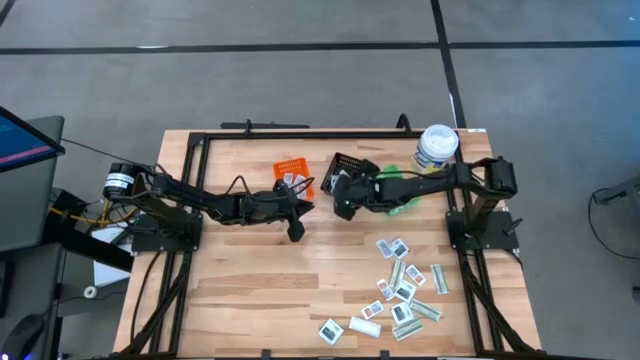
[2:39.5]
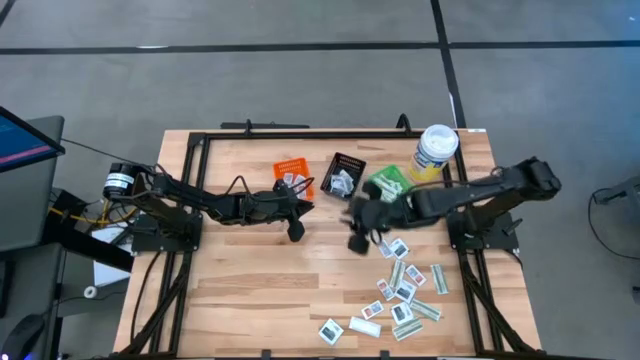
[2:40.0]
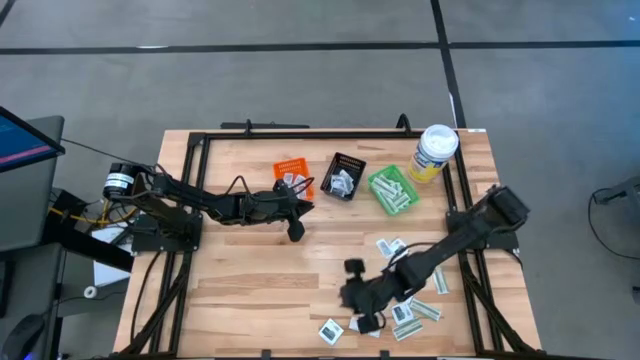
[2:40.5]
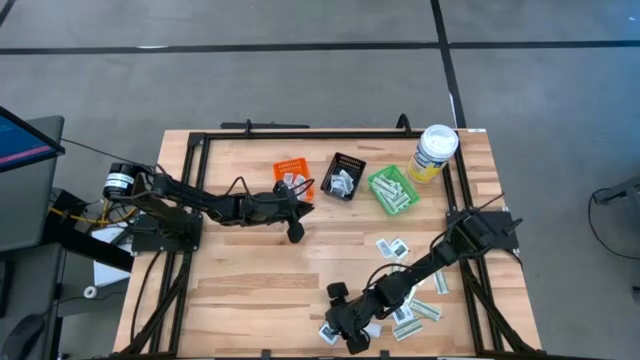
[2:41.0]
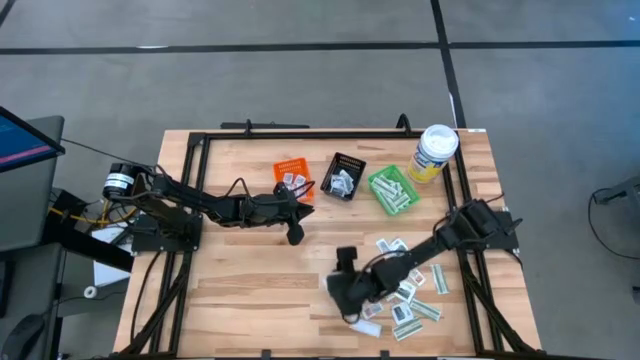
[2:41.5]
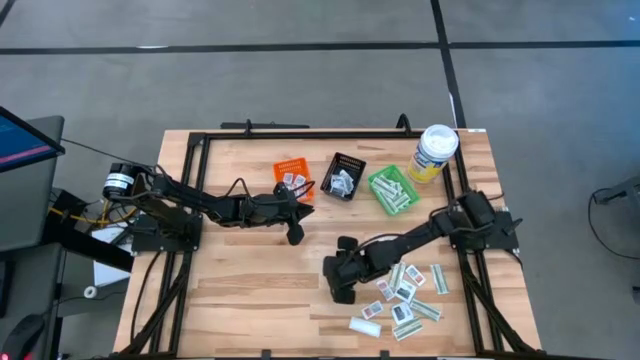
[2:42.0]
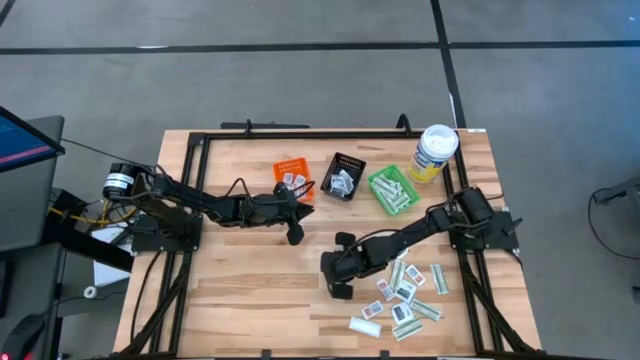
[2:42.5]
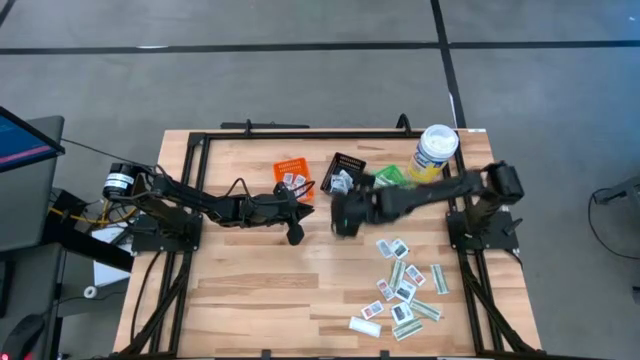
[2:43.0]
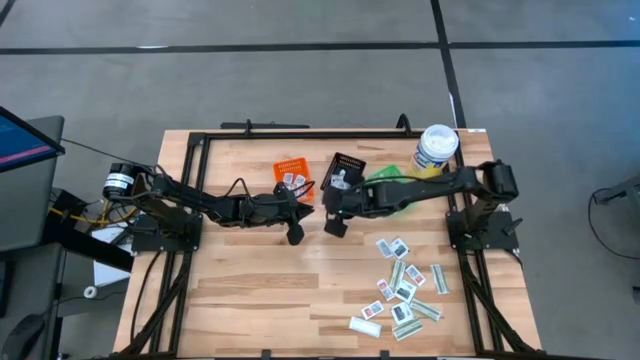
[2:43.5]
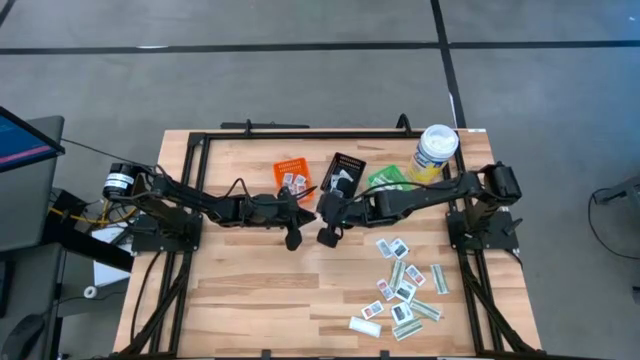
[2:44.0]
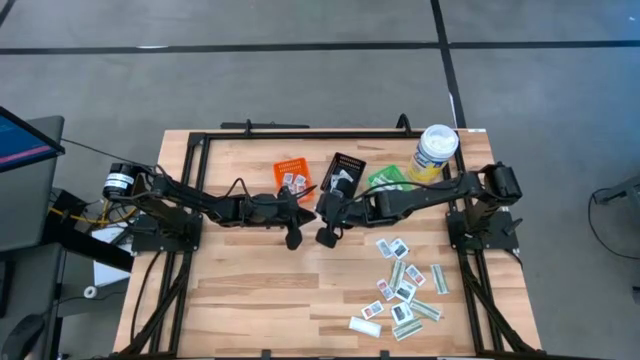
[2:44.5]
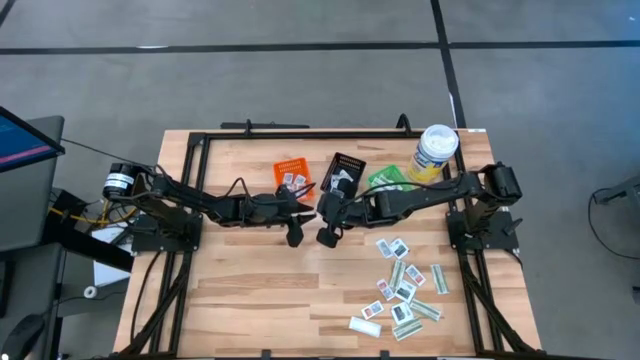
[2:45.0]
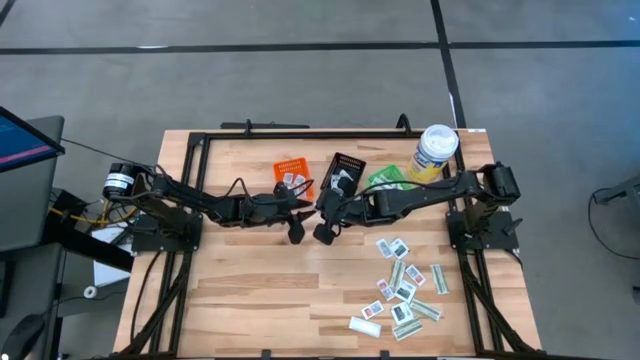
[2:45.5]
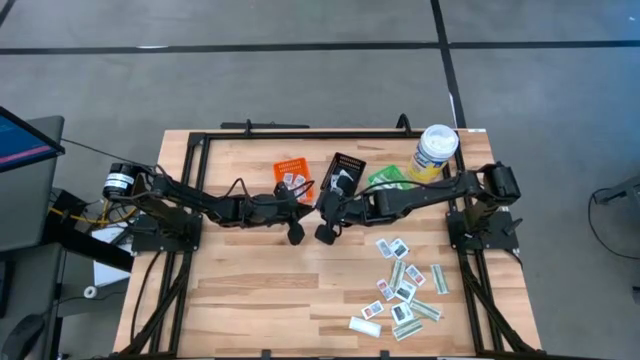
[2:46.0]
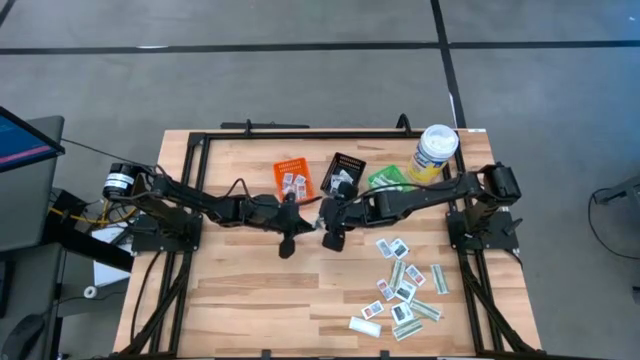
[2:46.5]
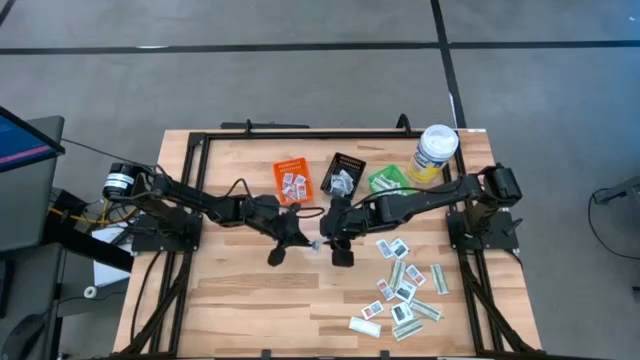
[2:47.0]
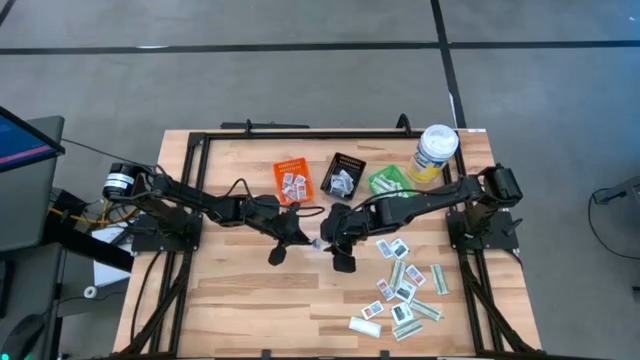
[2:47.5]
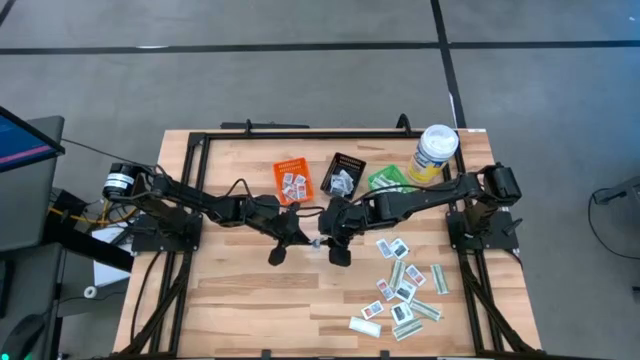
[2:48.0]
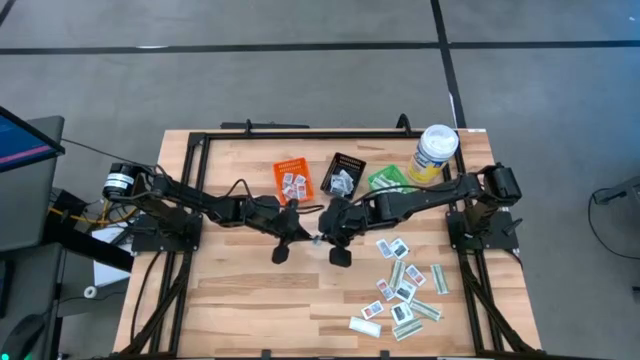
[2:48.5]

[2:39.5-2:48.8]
Task: Pick & Place First Aid Supplies
Put the black towelette pack into the black basket

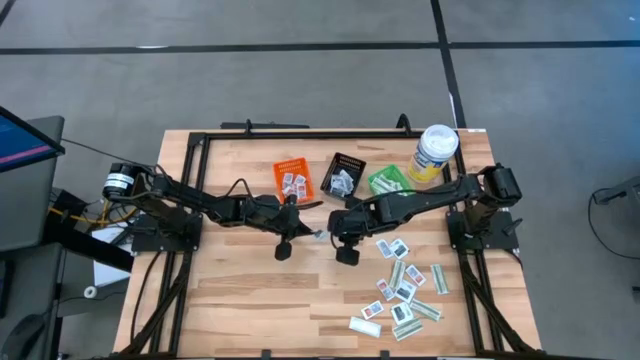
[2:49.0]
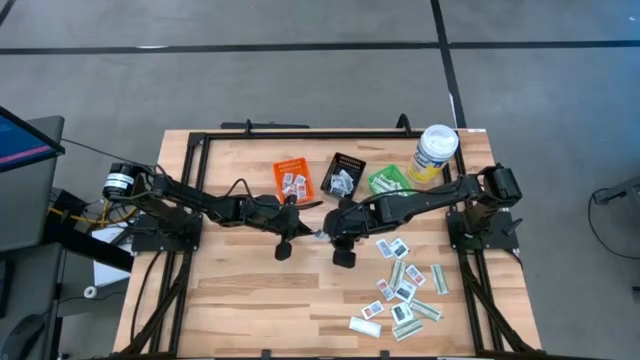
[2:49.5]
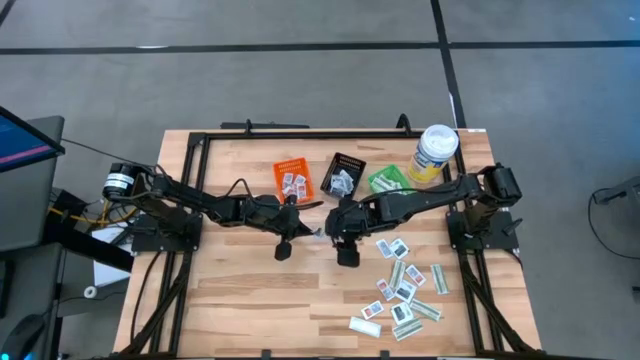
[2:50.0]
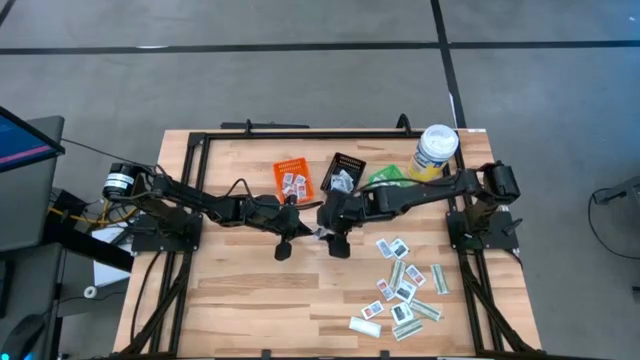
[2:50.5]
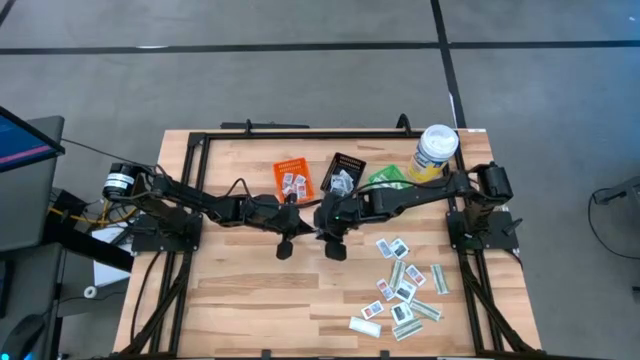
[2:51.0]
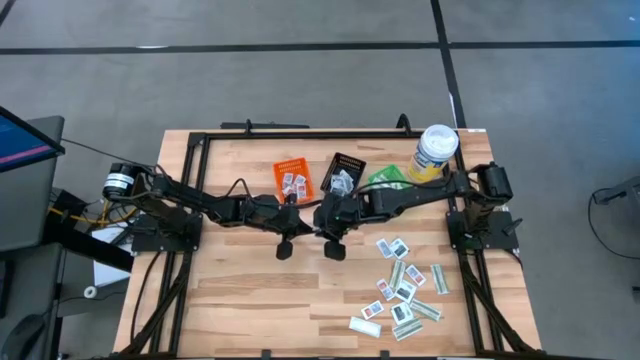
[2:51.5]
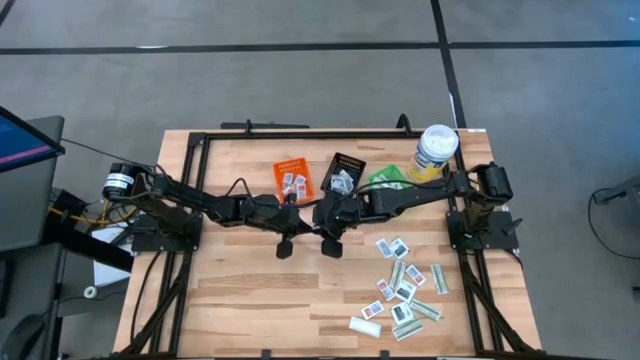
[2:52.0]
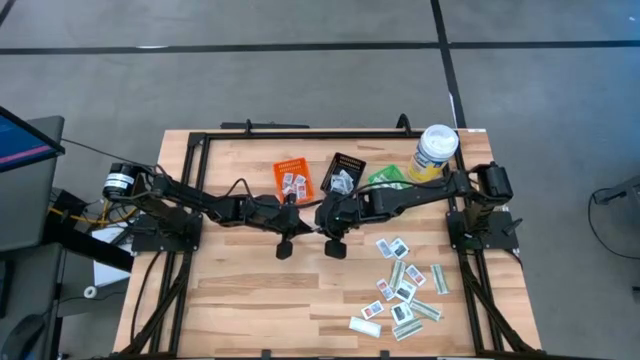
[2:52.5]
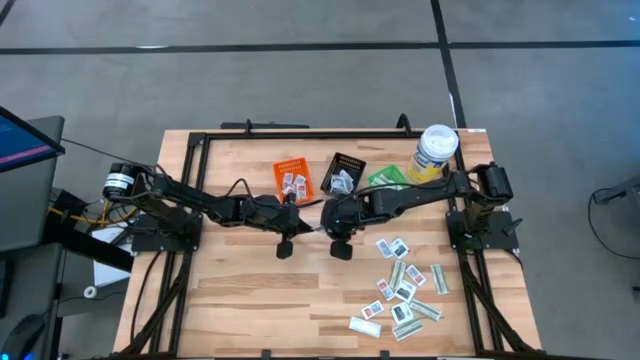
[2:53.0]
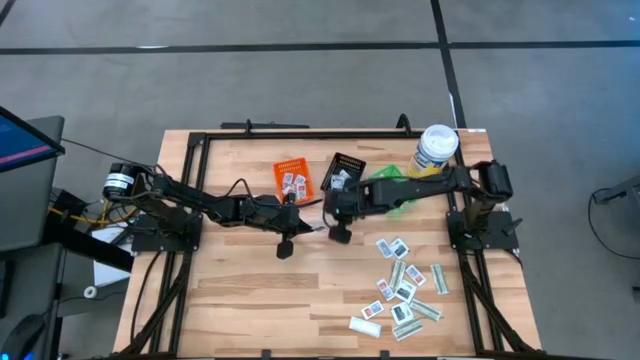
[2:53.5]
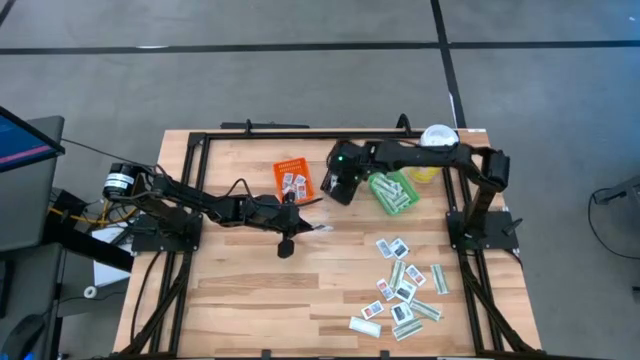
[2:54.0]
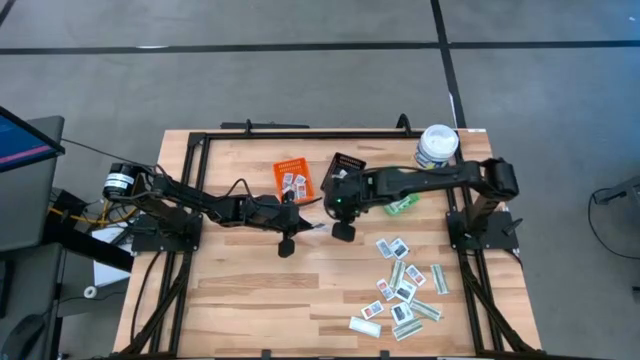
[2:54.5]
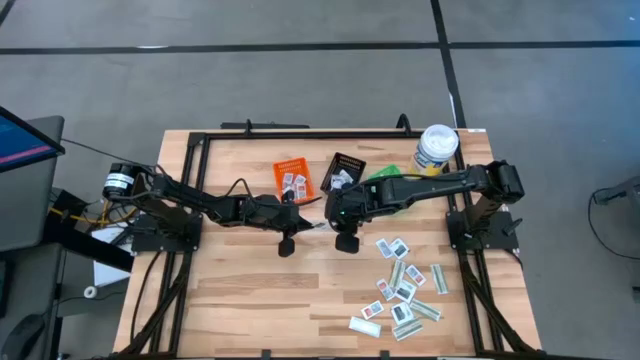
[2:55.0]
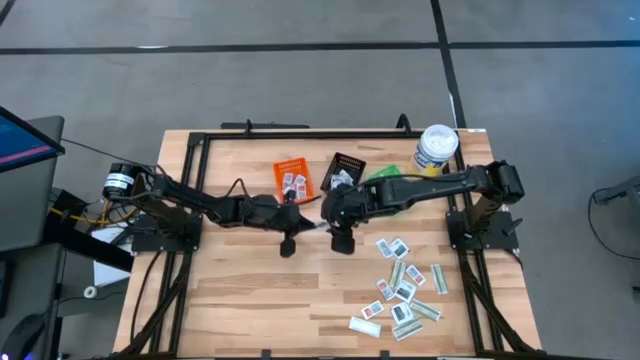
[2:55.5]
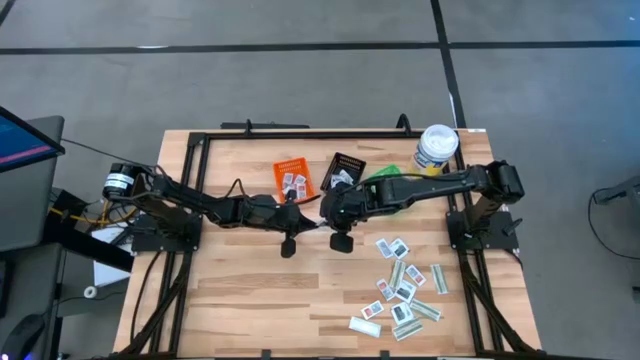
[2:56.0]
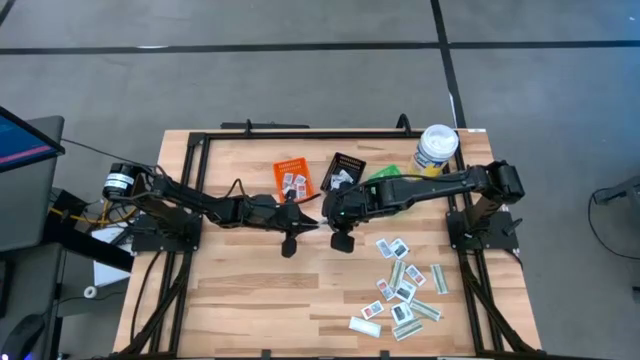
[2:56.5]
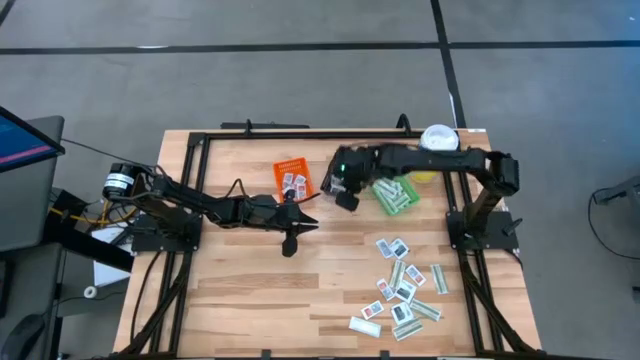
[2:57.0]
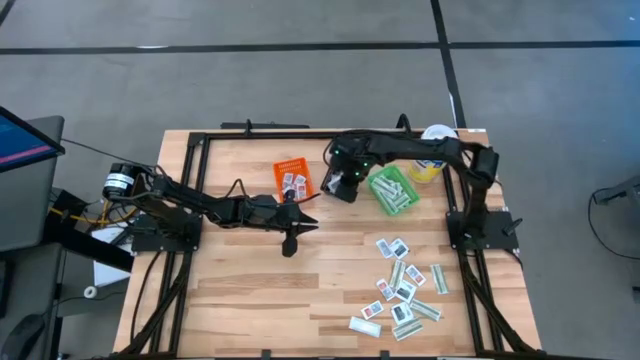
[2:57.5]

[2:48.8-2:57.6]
Put the black towelette pack into the black basket

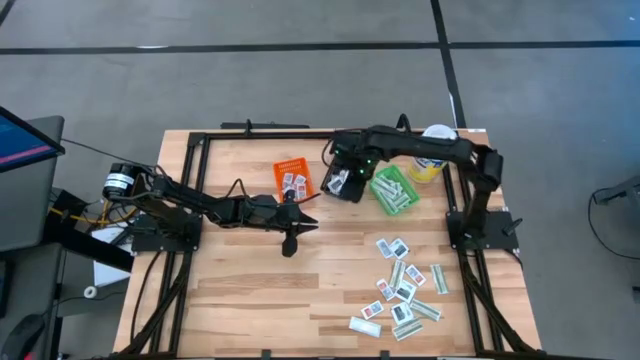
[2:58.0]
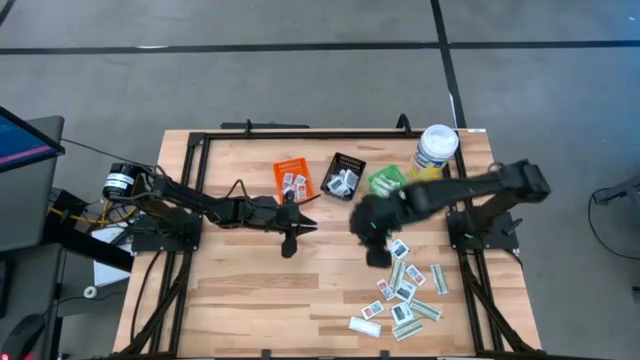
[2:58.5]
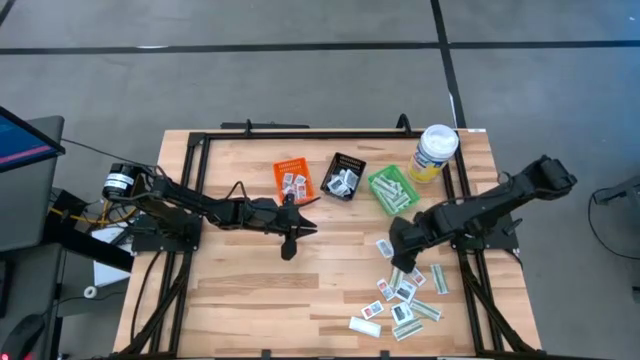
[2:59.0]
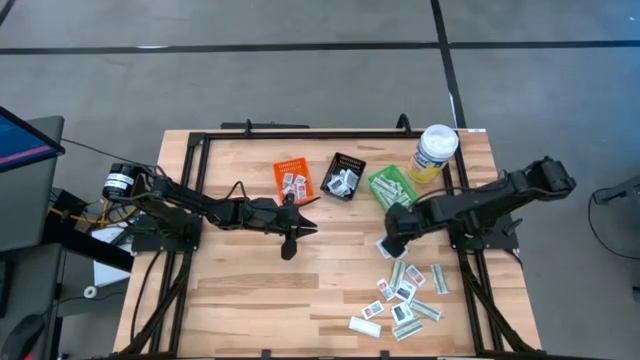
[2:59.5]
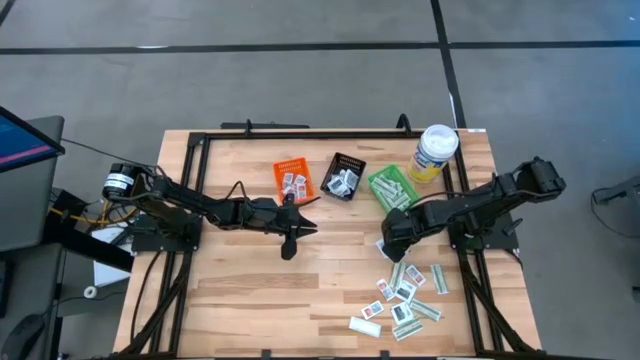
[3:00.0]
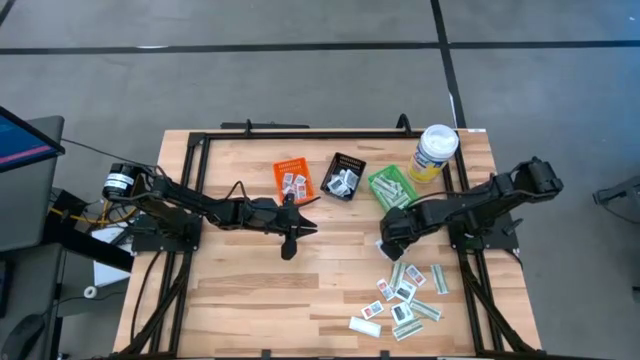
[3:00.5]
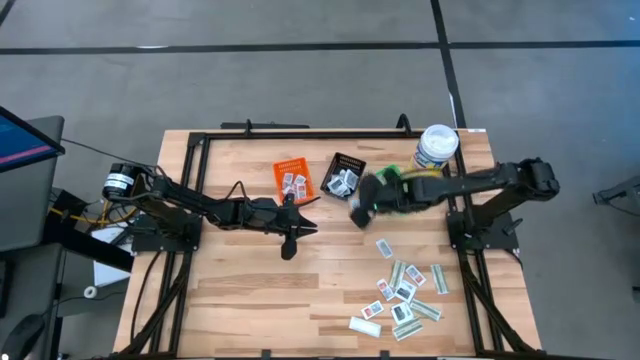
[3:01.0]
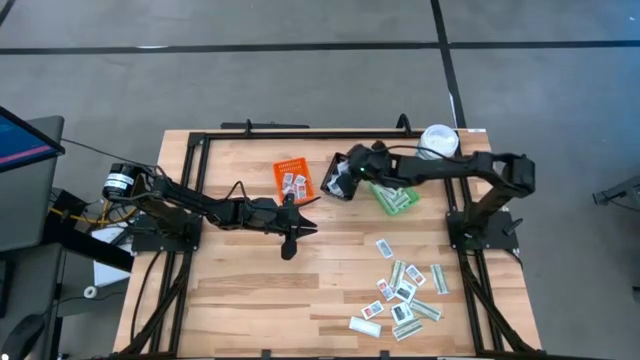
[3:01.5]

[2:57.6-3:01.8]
Put the black towelette pack into the black basket
